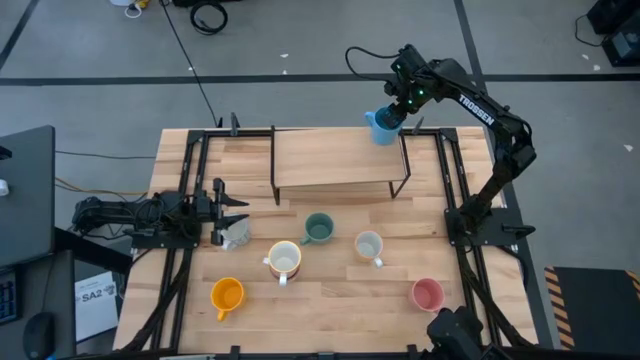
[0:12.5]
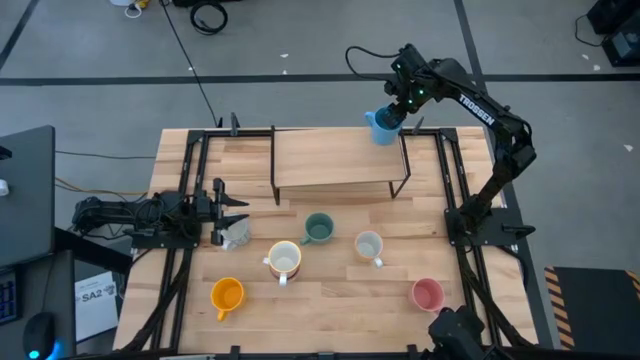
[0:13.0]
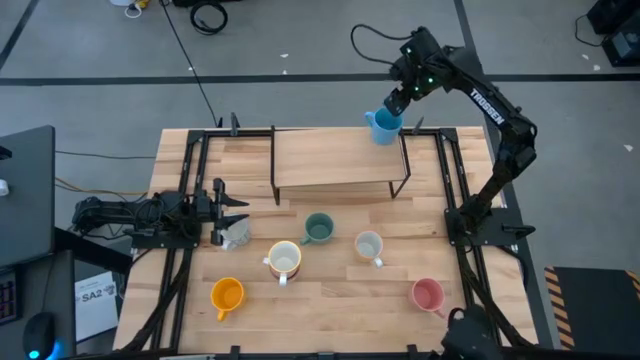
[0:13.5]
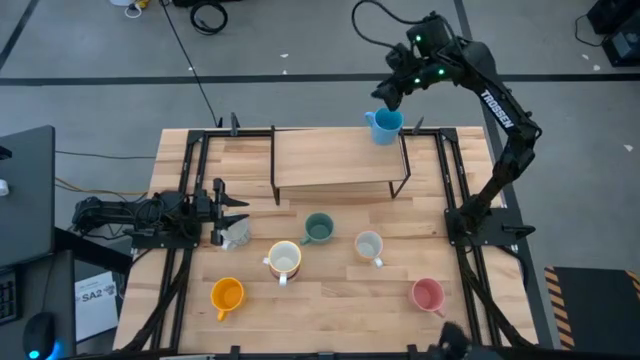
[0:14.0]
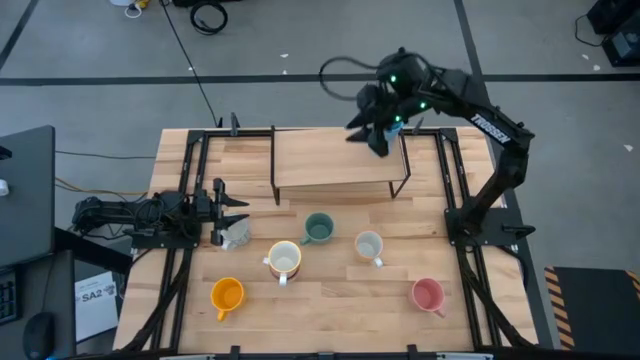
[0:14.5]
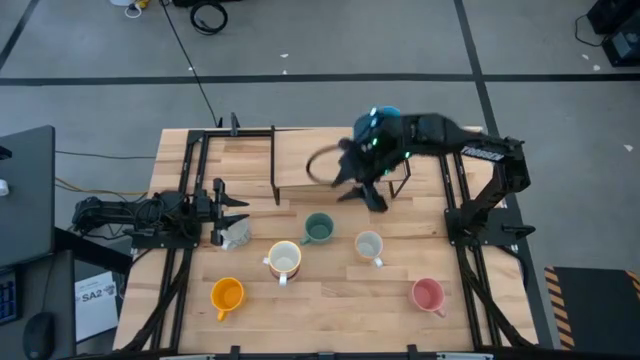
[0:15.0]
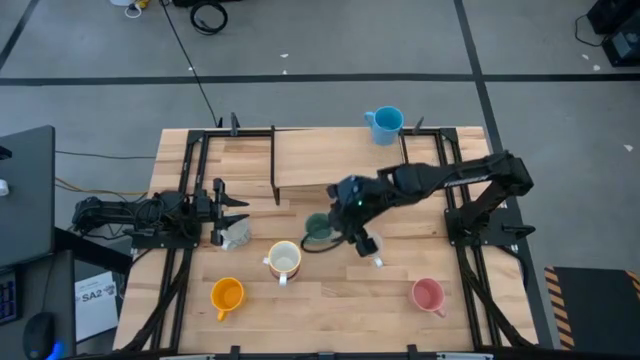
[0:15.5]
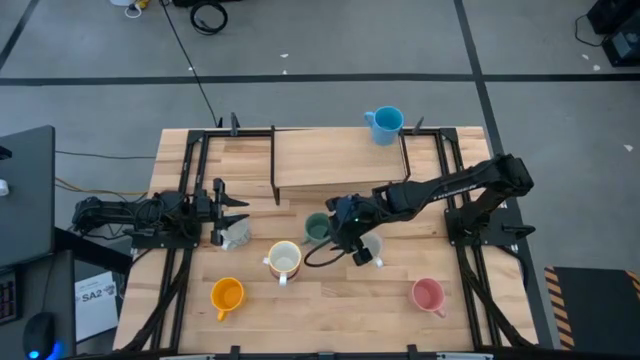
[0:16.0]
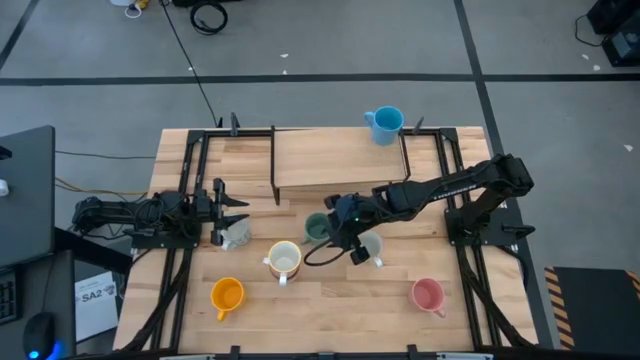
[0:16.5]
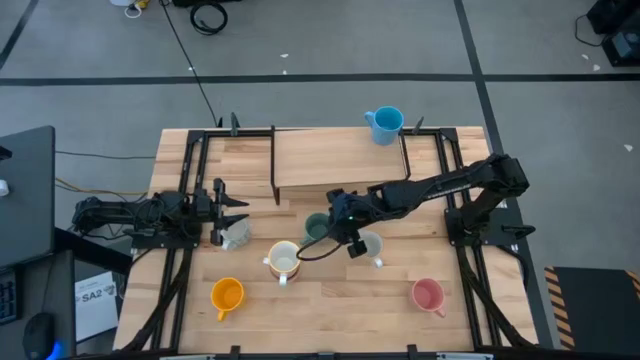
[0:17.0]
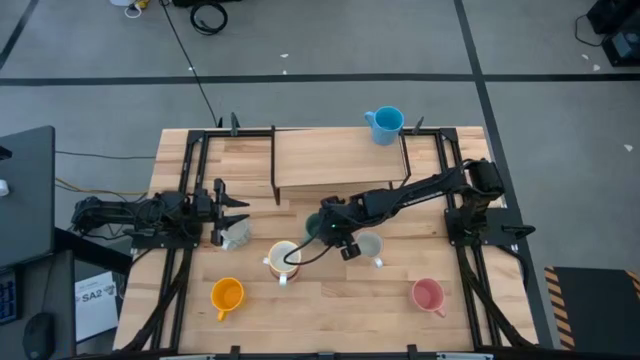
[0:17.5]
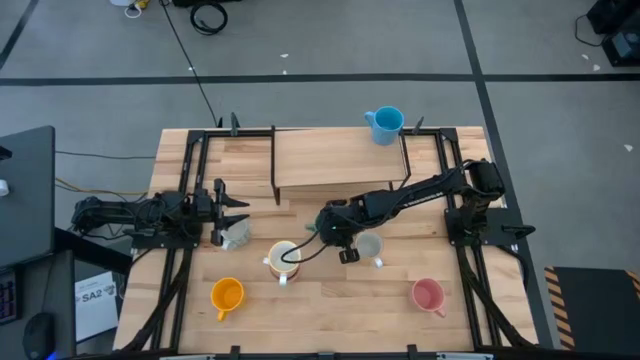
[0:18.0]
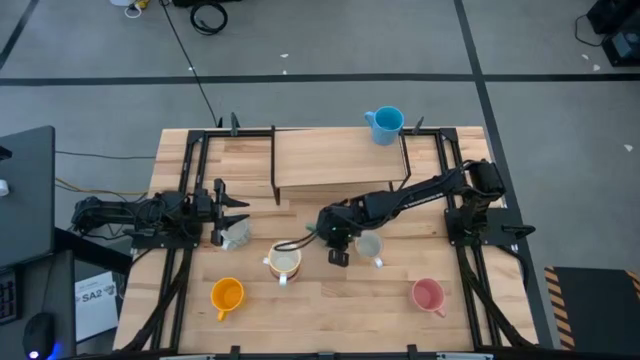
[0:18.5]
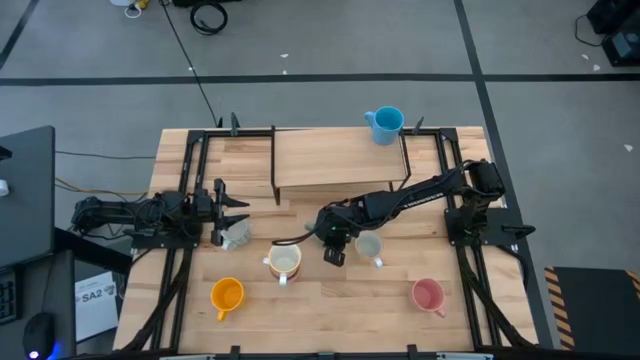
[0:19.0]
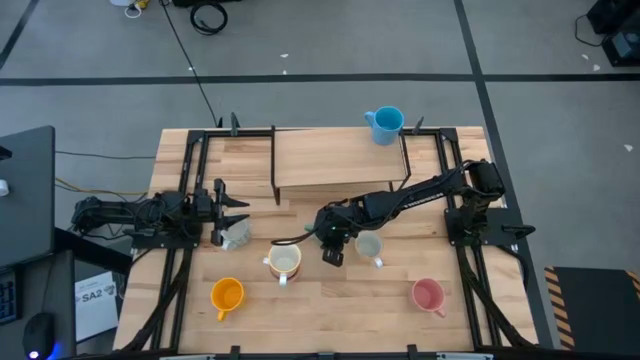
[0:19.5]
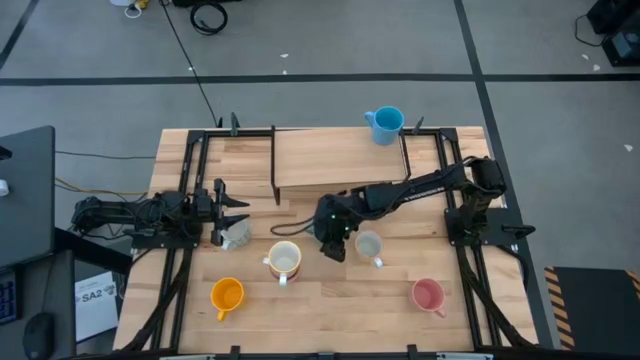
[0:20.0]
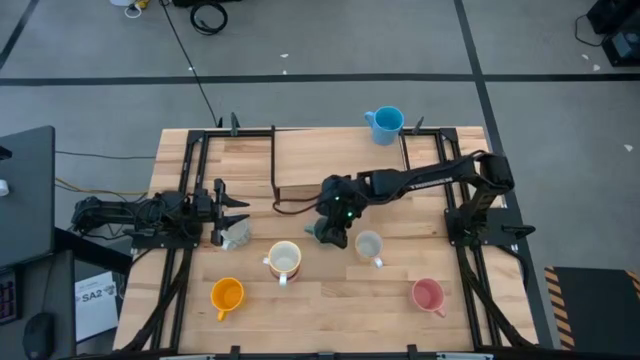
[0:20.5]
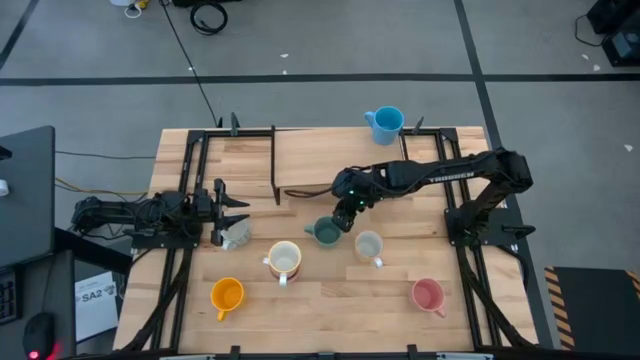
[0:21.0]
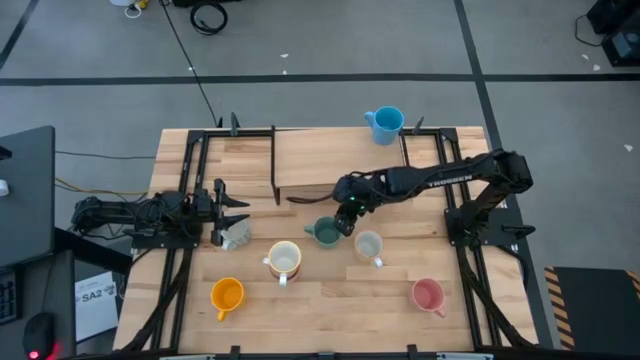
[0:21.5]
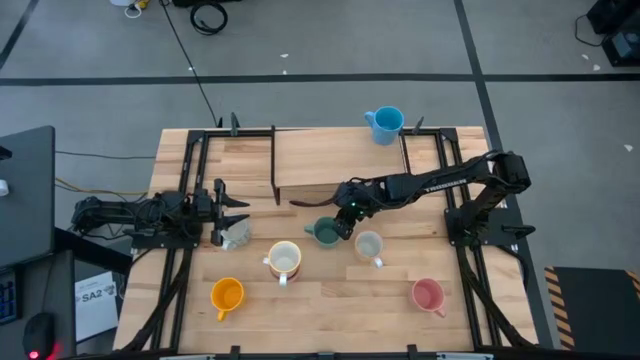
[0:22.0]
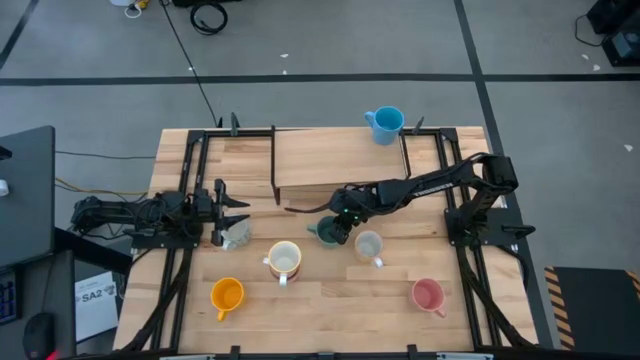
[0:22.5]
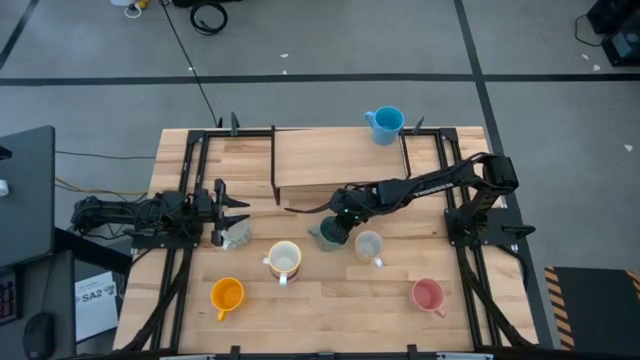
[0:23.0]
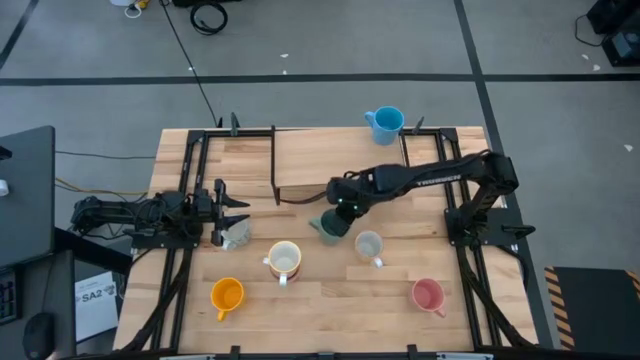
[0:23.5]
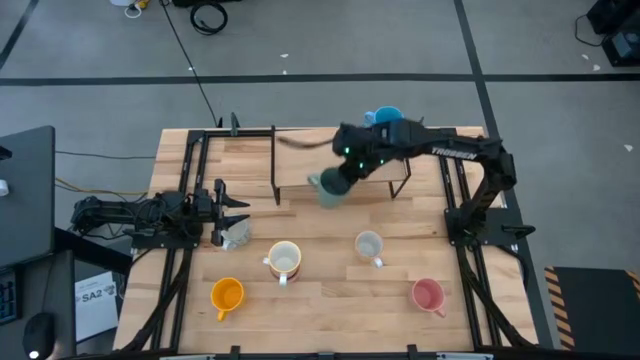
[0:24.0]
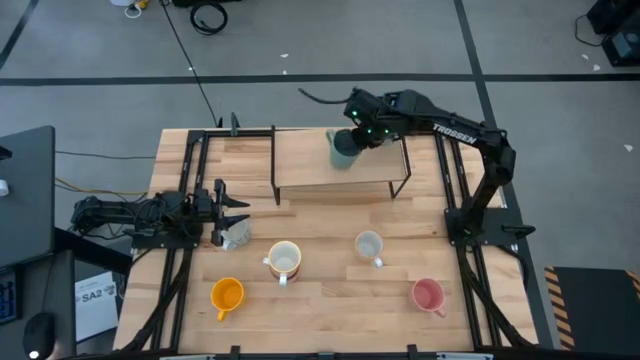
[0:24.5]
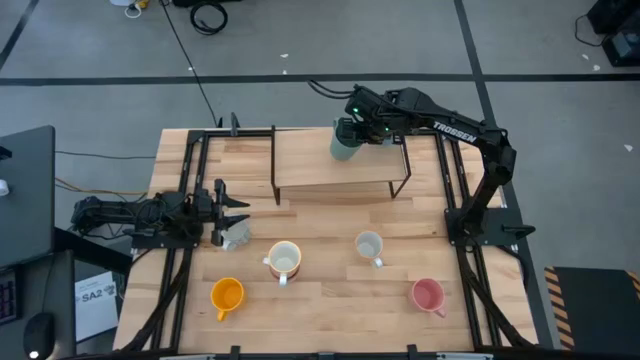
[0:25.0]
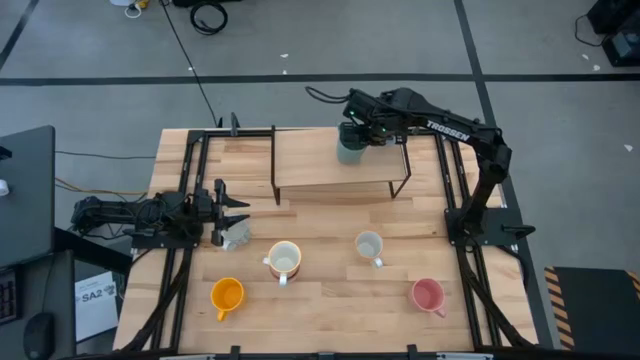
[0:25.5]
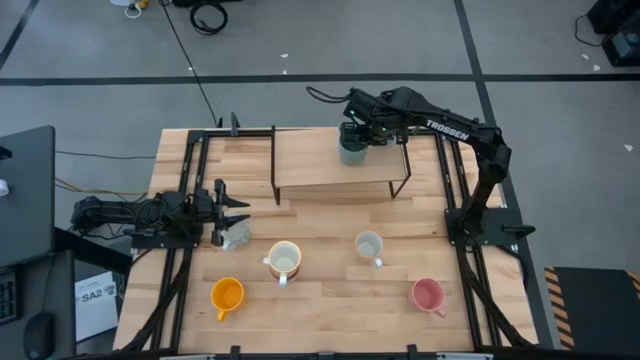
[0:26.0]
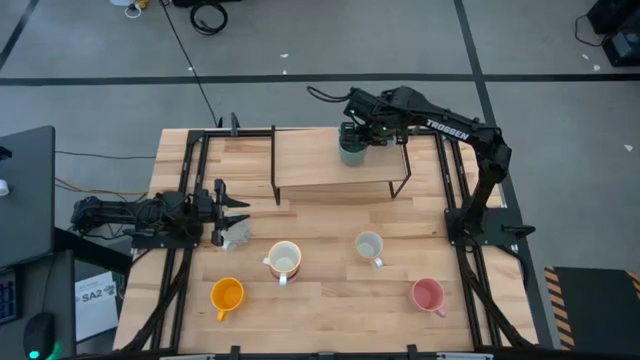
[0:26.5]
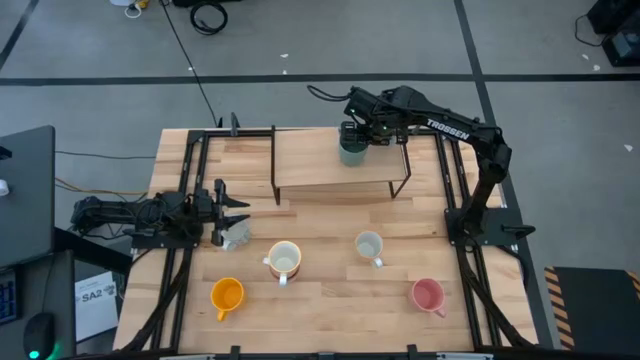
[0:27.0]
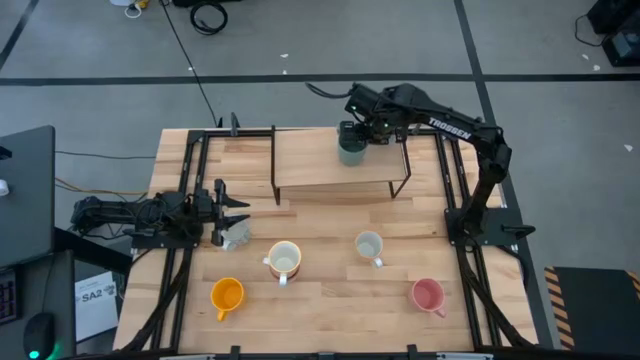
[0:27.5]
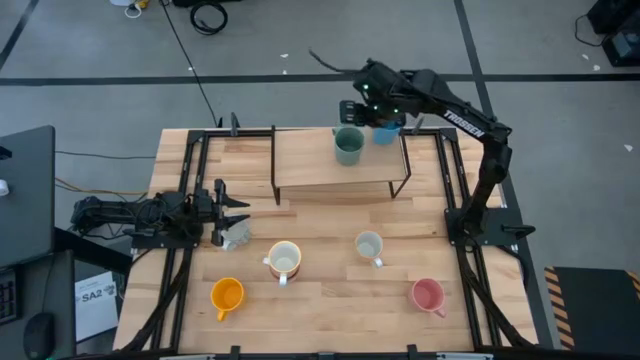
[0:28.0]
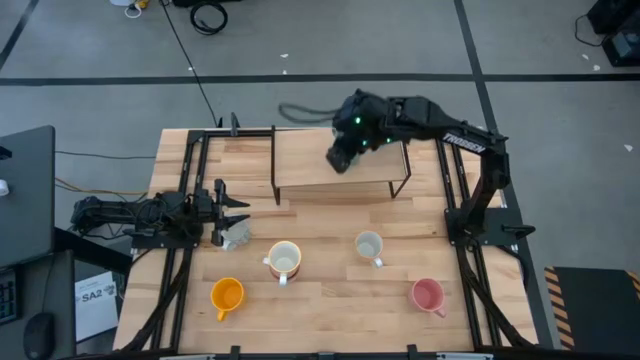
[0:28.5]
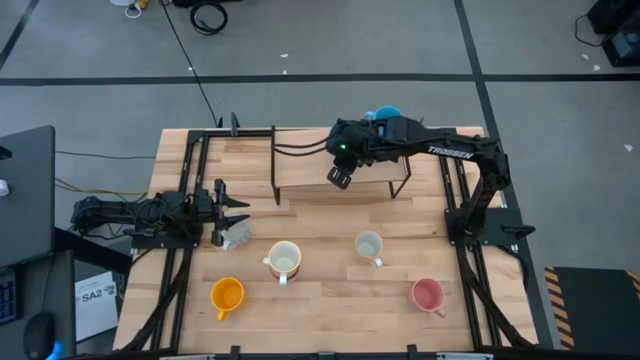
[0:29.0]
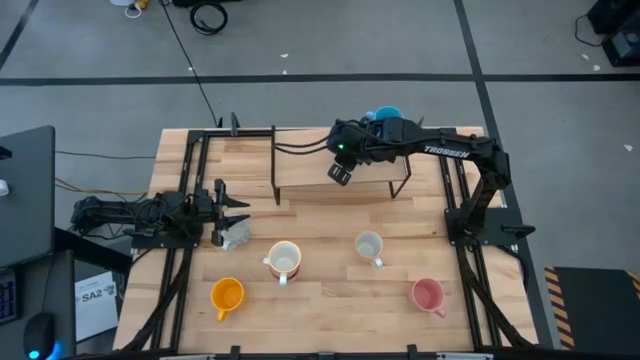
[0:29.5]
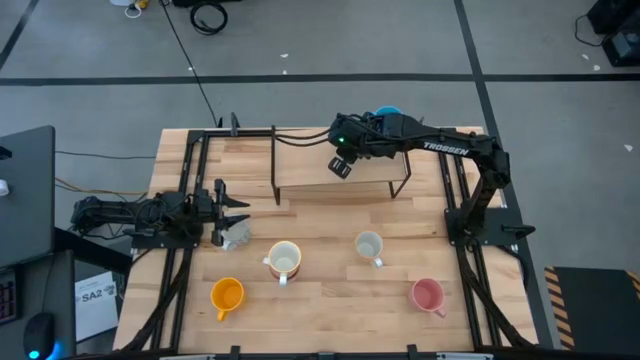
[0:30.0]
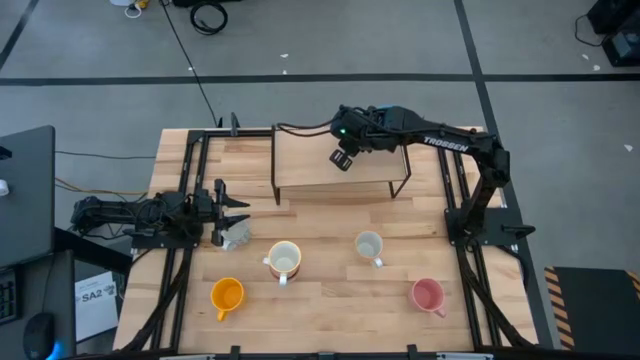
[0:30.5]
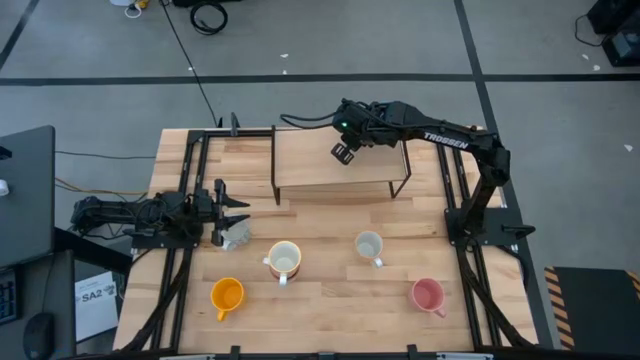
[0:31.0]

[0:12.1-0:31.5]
Task: Place coffee mugs
Put the green mug on the shelf

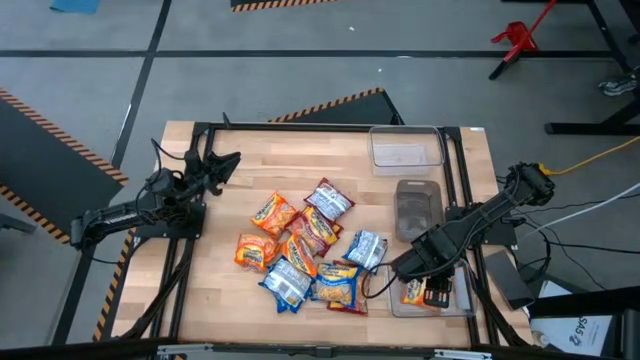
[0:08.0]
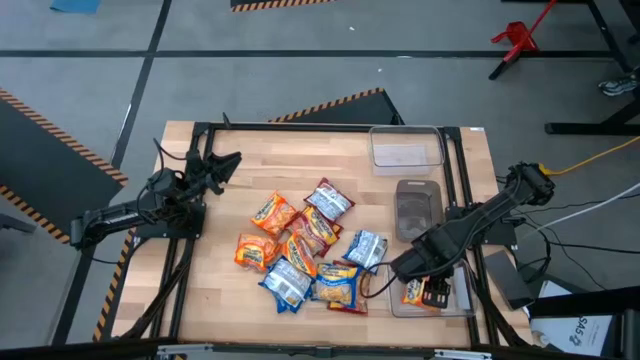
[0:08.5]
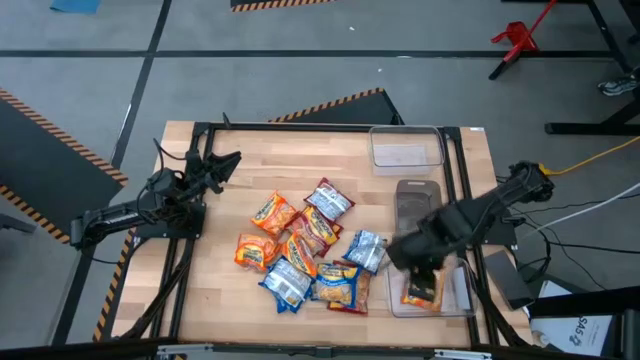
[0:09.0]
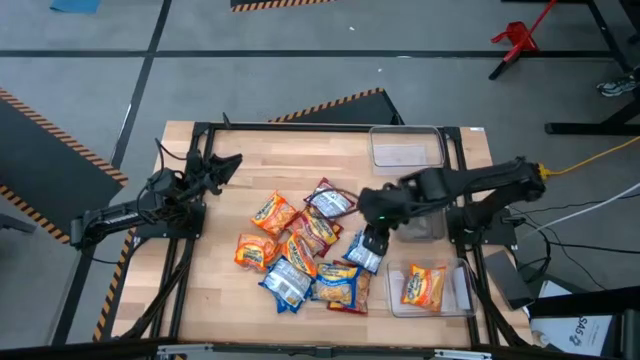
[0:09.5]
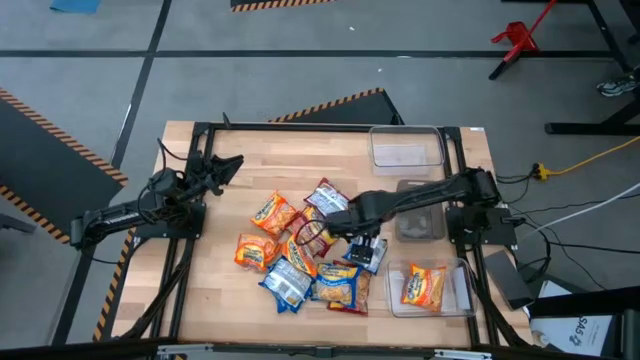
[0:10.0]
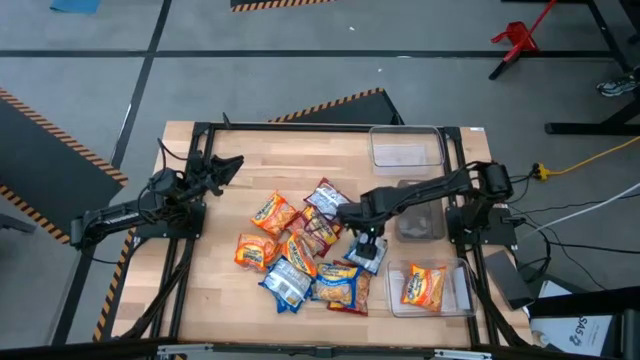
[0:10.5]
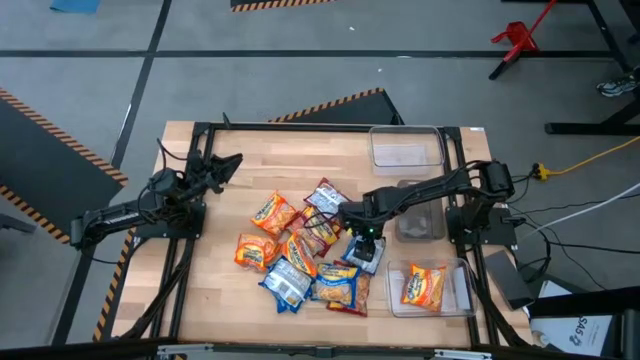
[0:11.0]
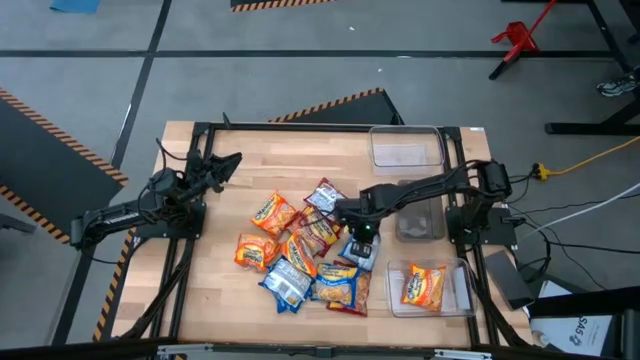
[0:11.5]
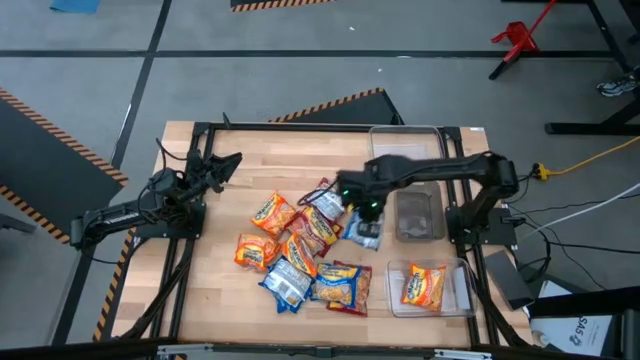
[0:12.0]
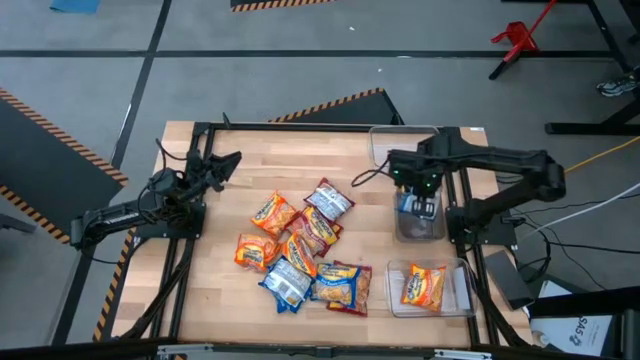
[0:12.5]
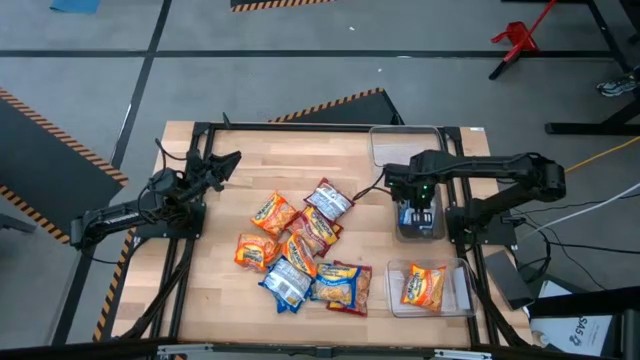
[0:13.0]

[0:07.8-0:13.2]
Task: Sort Maruchan noodles
Put the blue noodle pack into the black bin
